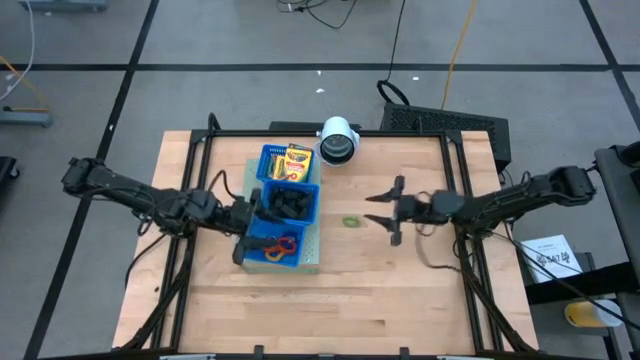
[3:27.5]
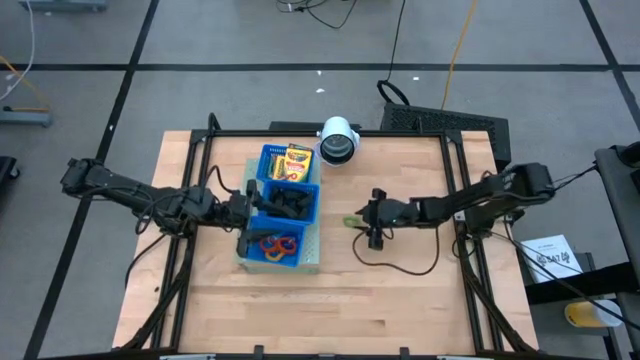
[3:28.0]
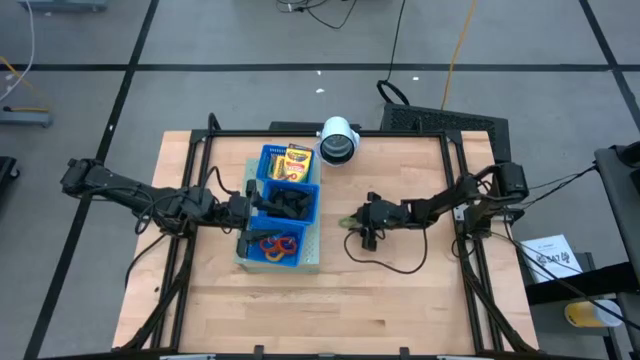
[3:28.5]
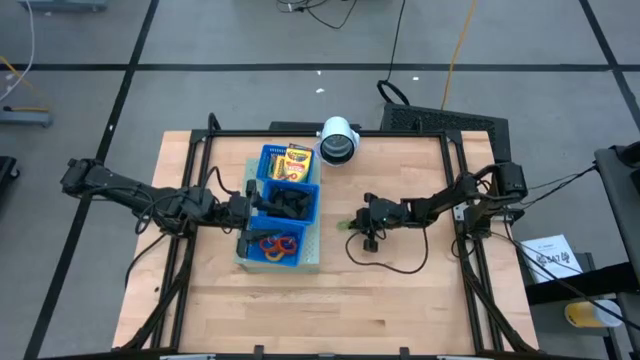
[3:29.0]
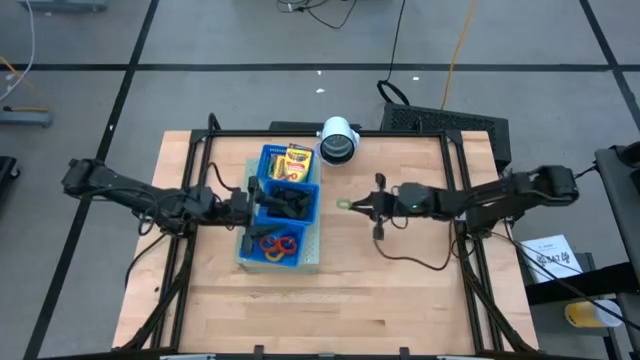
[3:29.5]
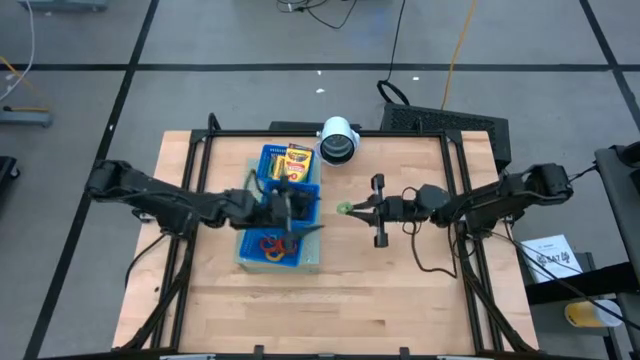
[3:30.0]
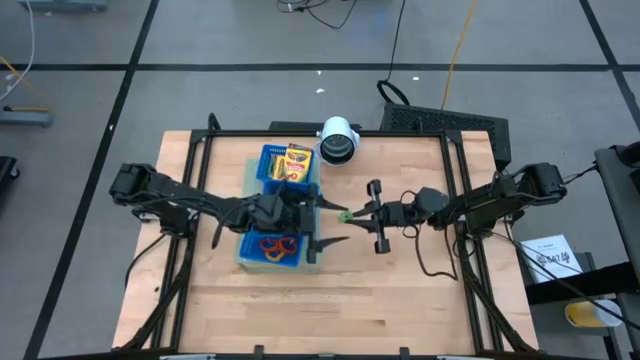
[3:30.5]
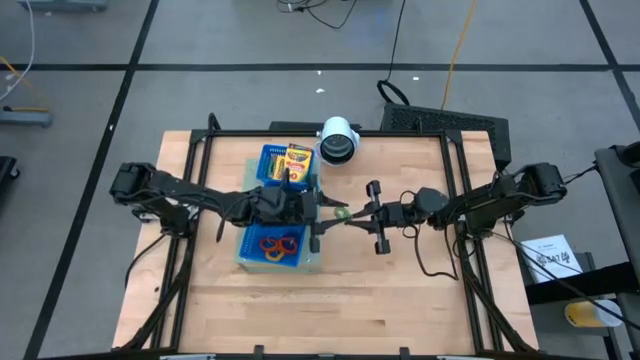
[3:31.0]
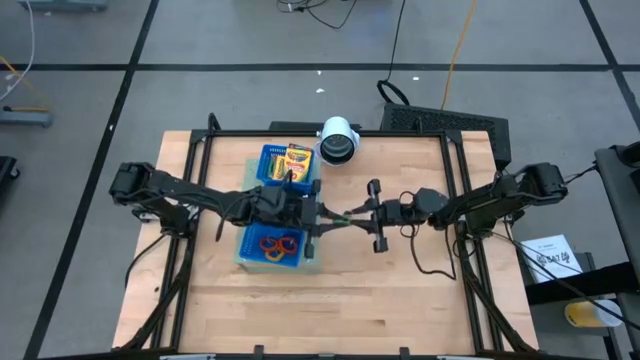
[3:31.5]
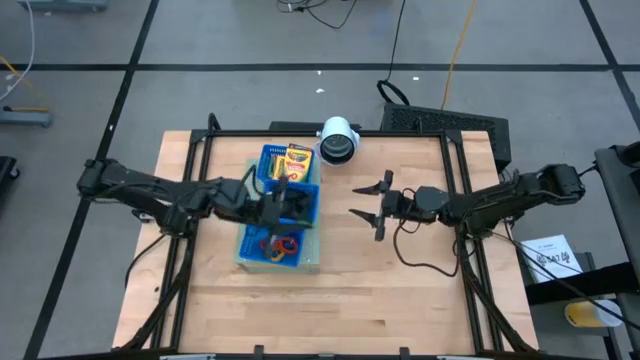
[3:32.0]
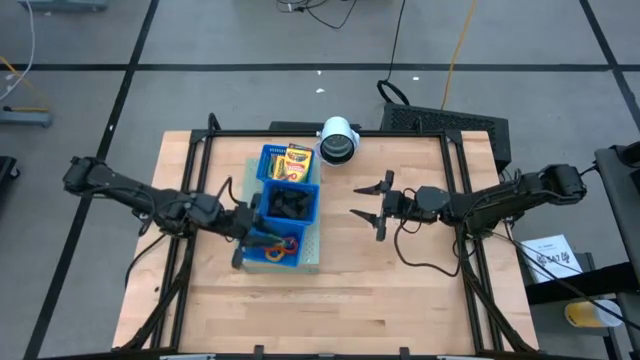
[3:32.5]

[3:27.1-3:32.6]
Task: Pick & Place Office Desk Supplies
Put the green spring rubber band into the bottom blue bin on the shelf

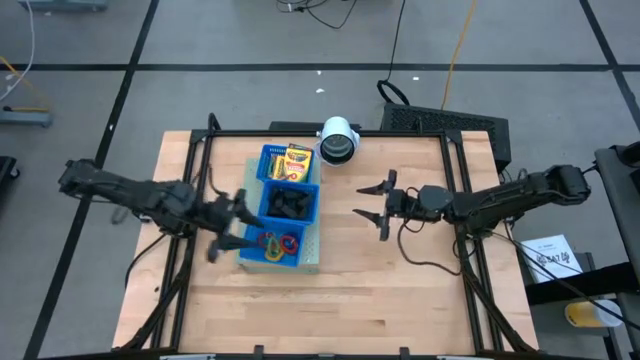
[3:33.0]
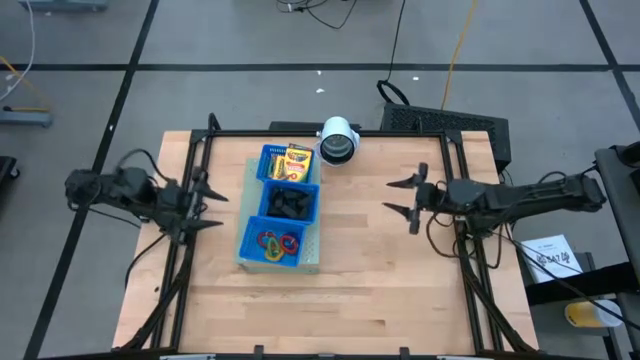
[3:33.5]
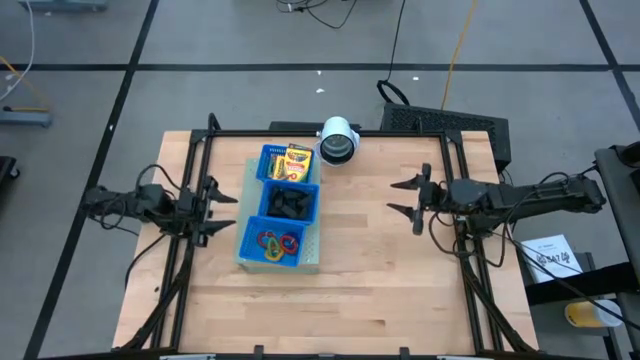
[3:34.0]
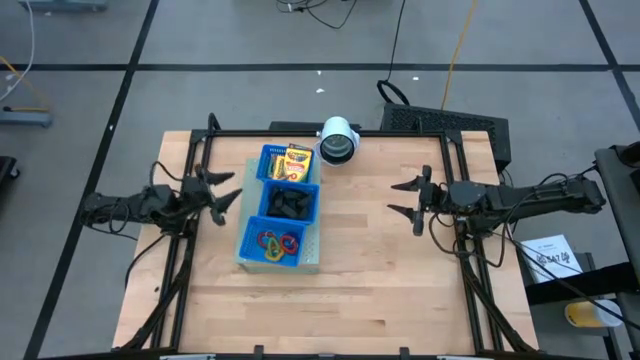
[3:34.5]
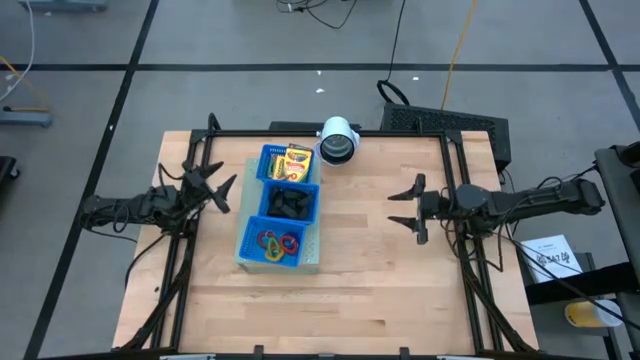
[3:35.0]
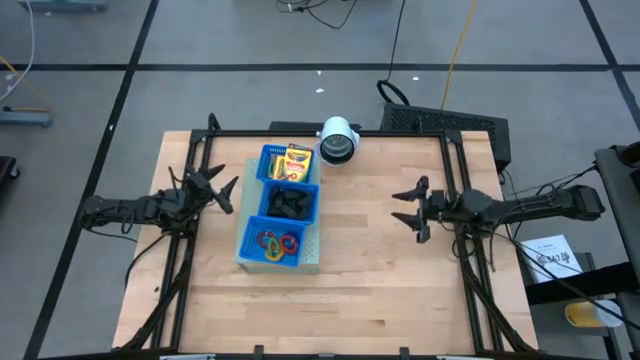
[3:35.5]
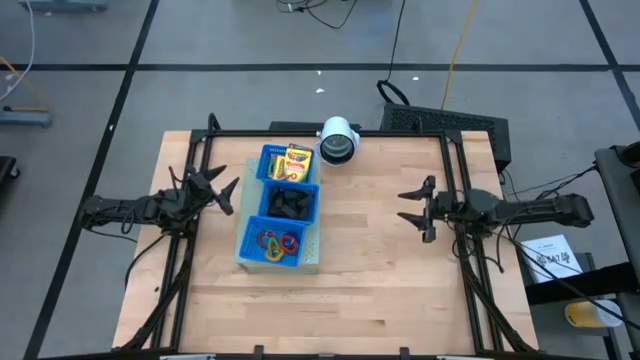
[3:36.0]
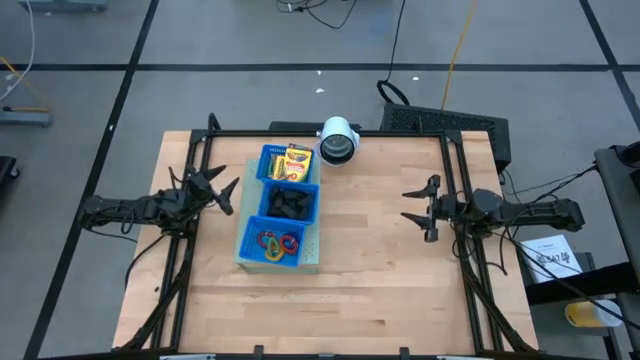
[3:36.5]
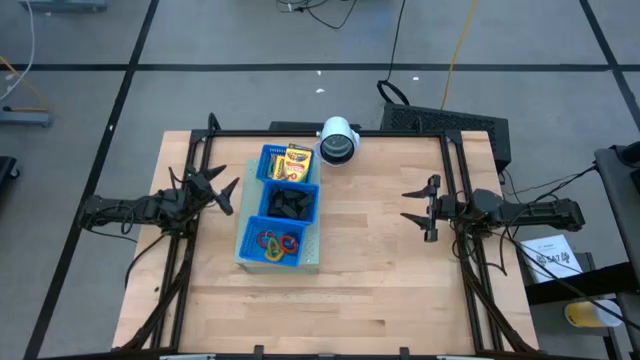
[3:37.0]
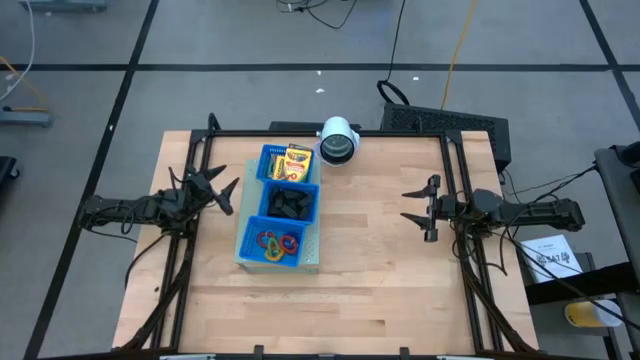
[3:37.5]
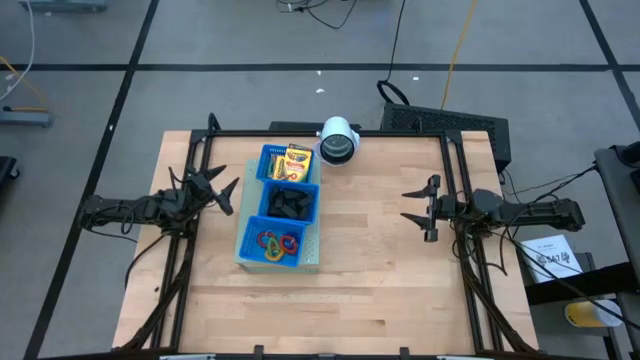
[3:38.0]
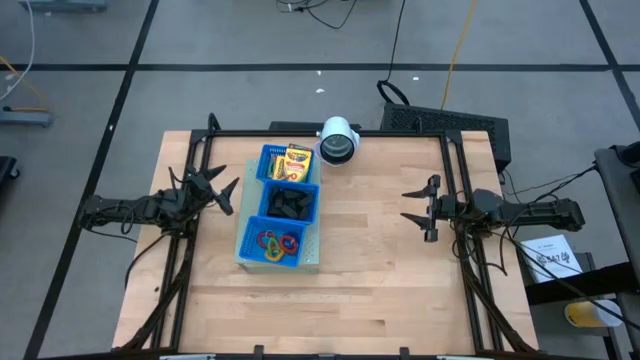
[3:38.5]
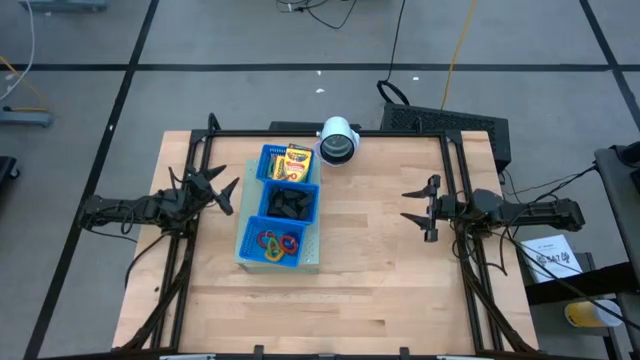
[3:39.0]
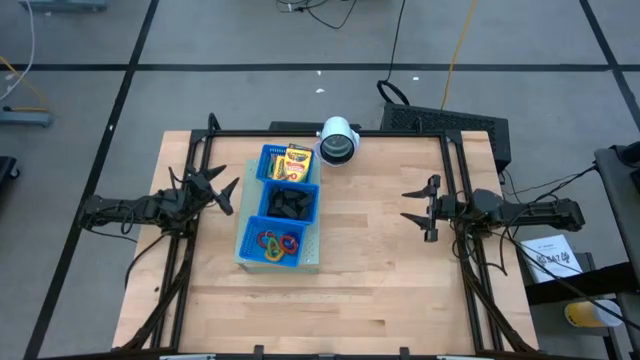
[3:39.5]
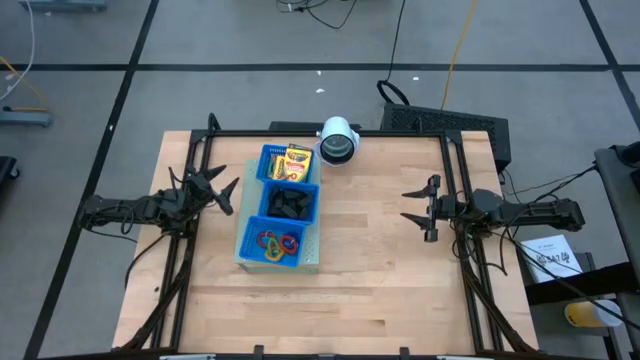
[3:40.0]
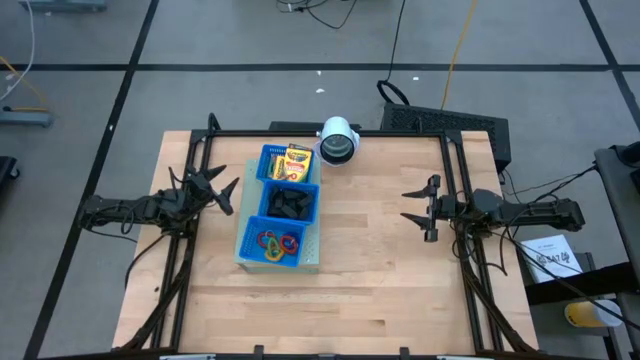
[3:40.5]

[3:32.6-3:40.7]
Return to Home Position

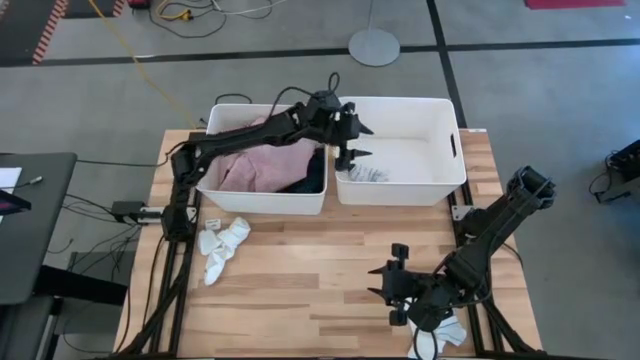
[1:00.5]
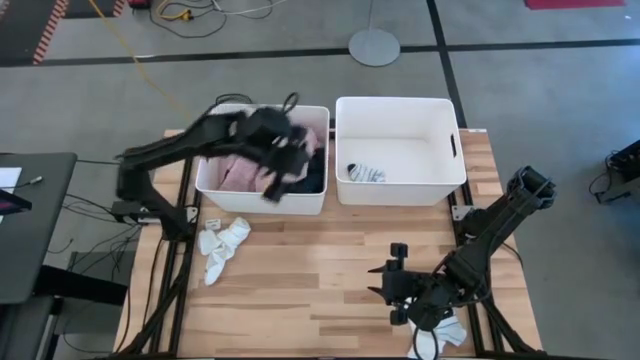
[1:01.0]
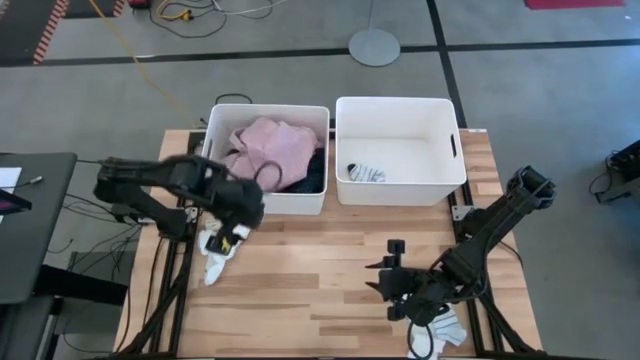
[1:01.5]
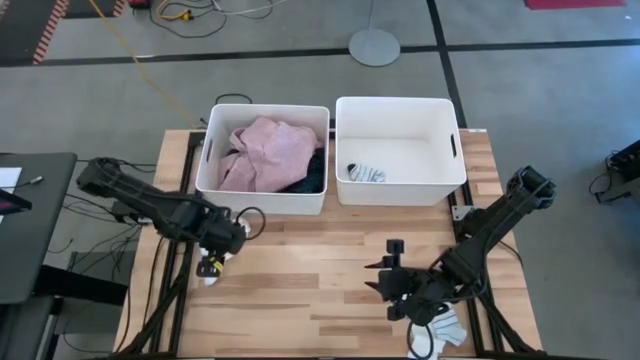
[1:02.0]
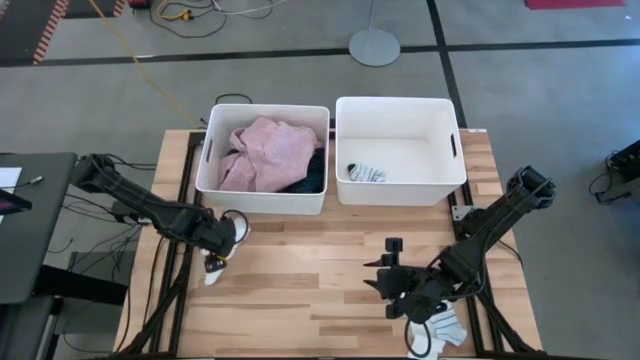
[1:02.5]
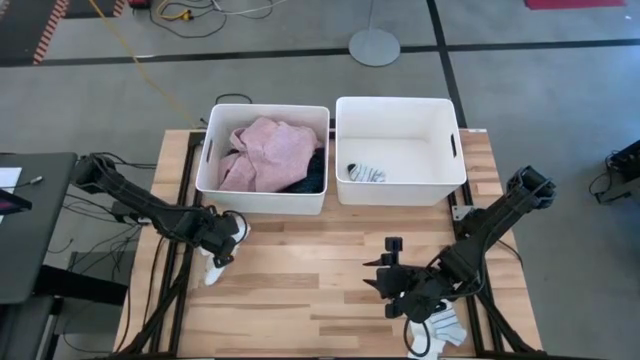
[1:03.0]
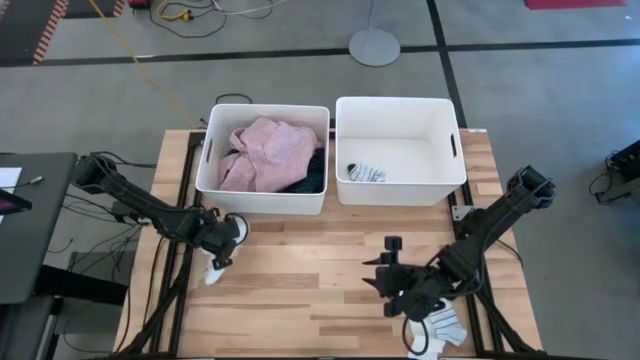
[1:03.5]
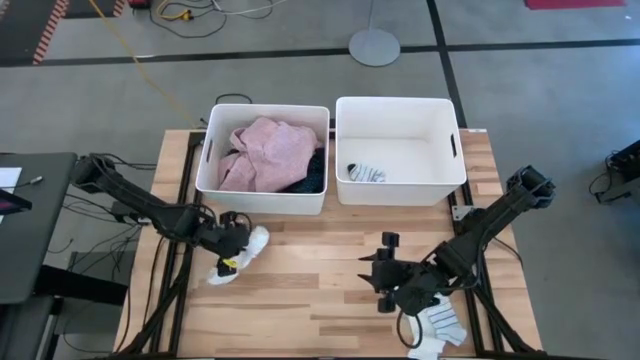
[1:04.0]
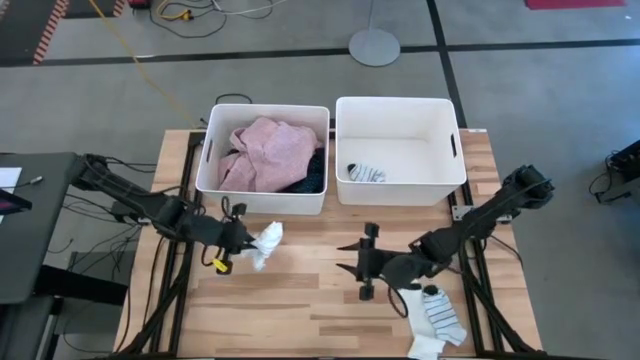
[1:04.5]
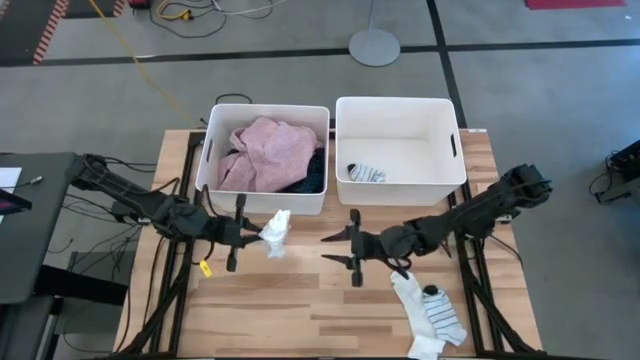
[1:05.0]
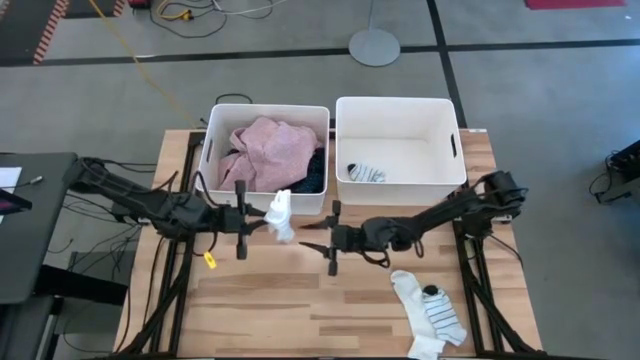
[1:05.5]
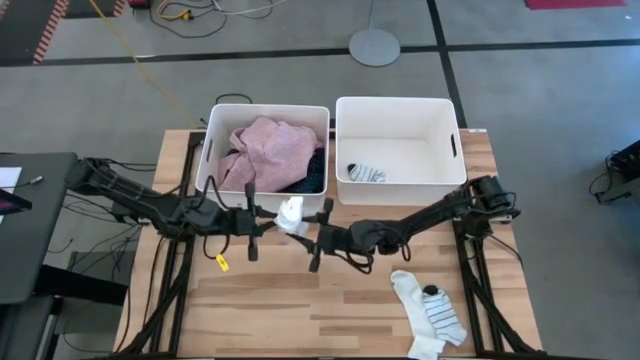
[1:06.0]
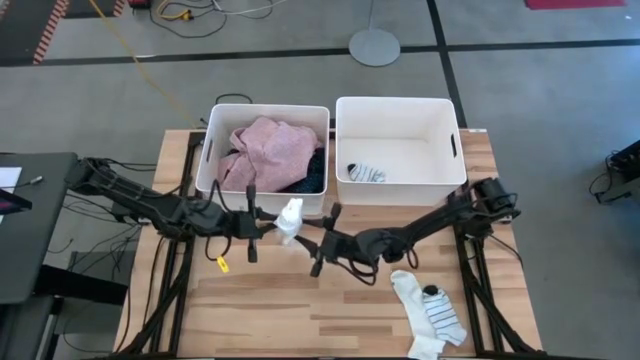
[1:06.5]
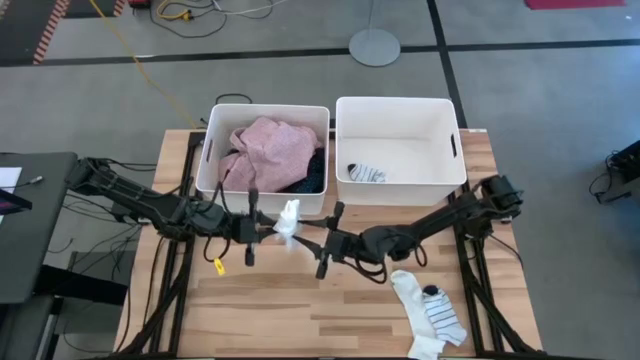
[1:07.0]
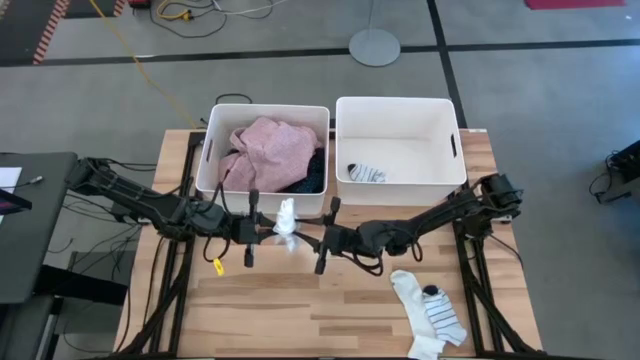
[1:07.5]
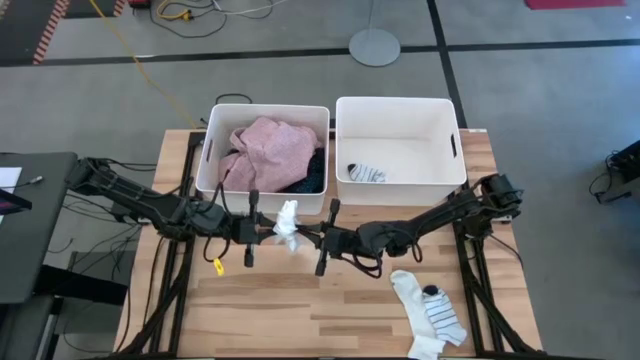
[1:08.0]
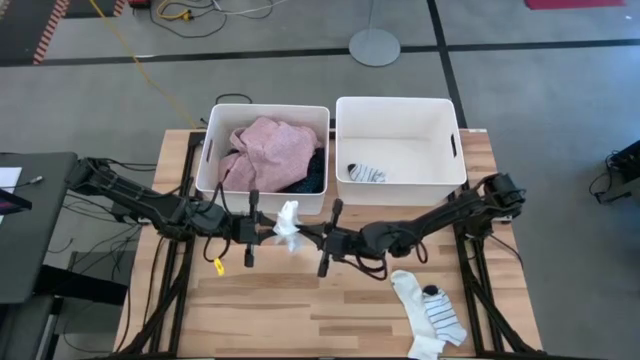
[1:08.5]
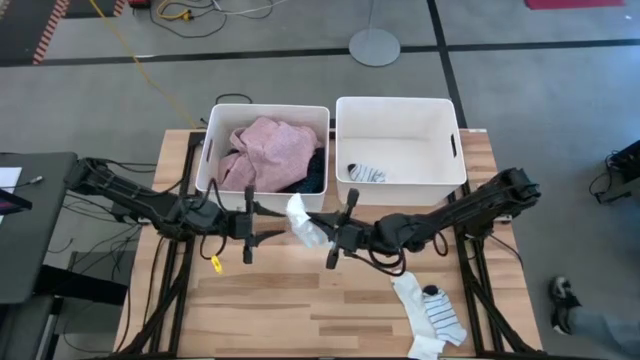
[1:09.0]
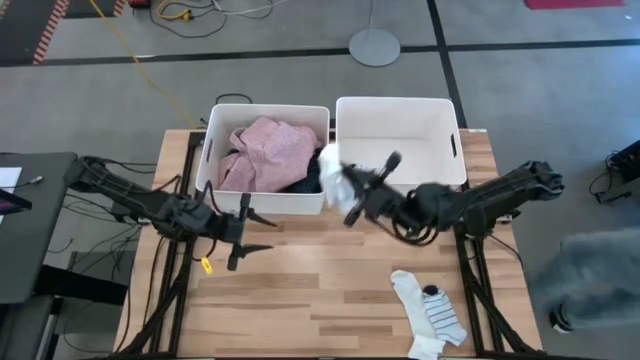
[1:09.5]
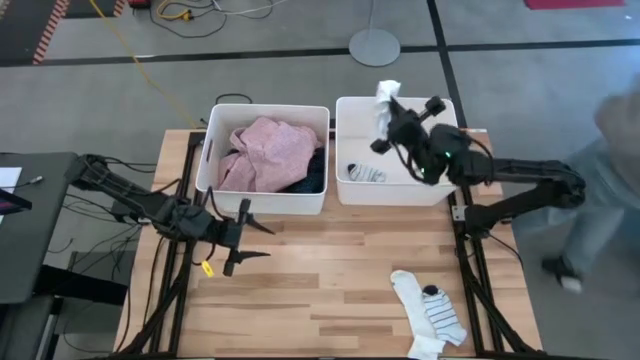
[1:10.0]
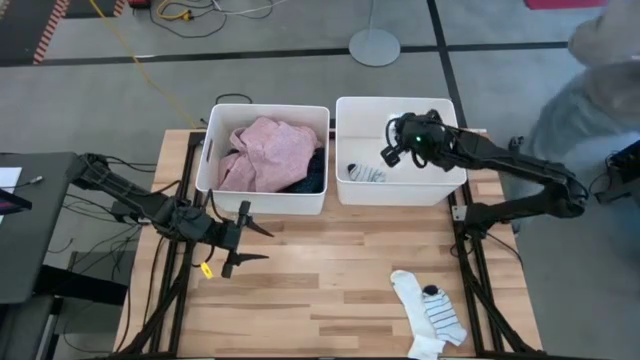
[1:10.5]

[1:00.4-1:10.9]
Task: Sort clothes
Put the left white sock into the right white laundry bin
